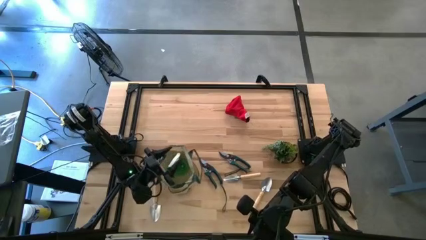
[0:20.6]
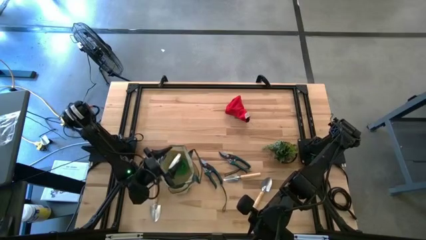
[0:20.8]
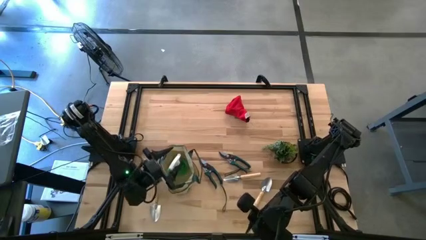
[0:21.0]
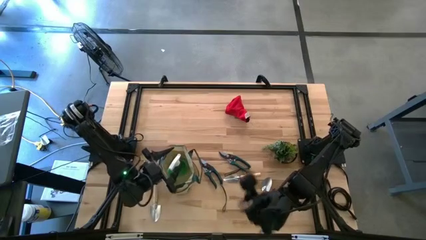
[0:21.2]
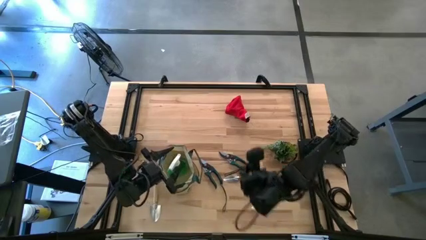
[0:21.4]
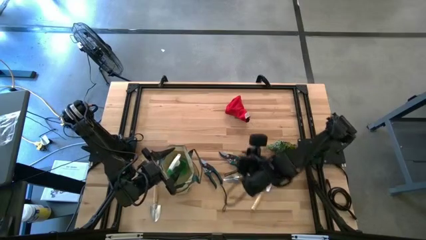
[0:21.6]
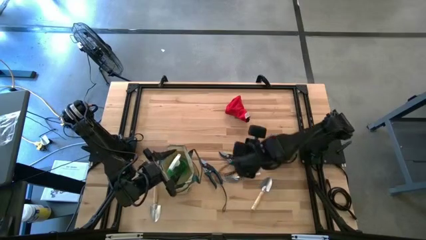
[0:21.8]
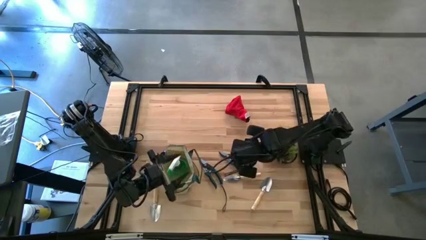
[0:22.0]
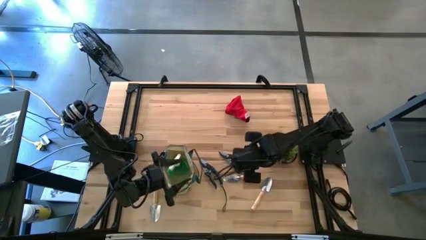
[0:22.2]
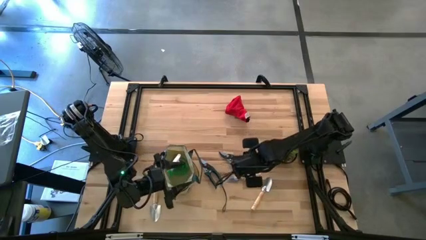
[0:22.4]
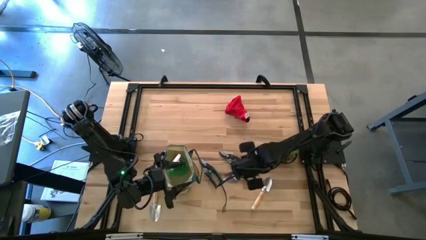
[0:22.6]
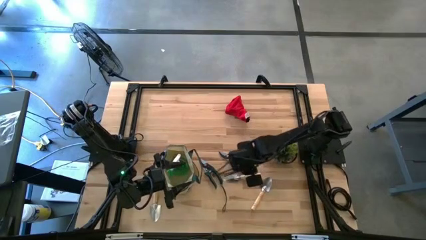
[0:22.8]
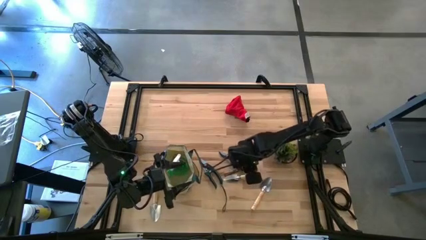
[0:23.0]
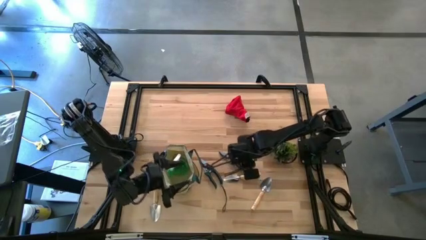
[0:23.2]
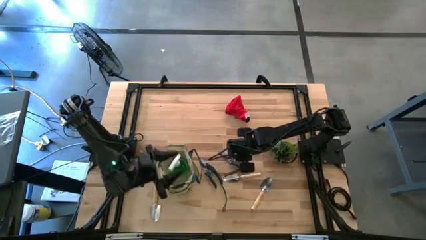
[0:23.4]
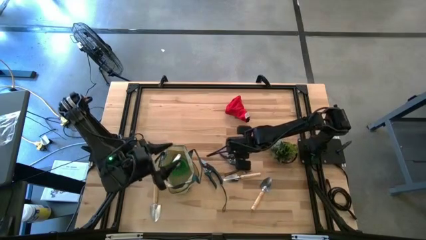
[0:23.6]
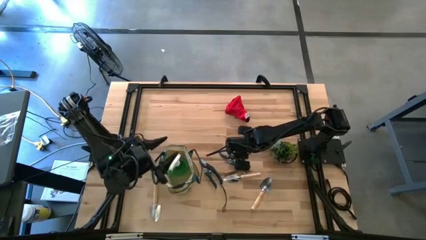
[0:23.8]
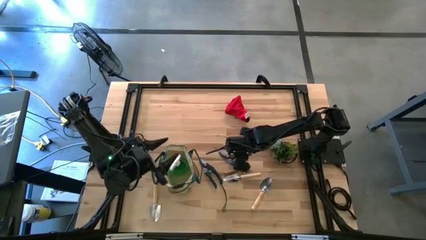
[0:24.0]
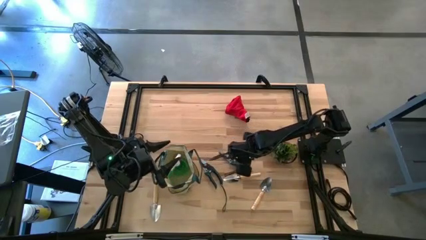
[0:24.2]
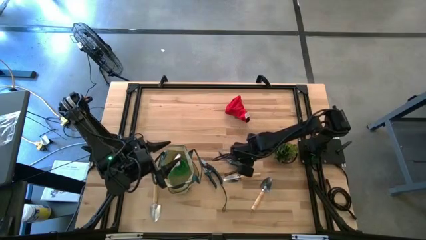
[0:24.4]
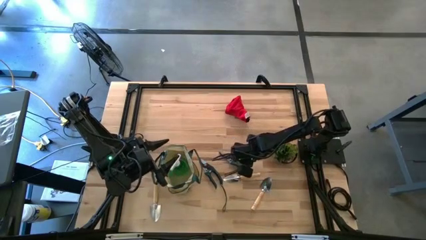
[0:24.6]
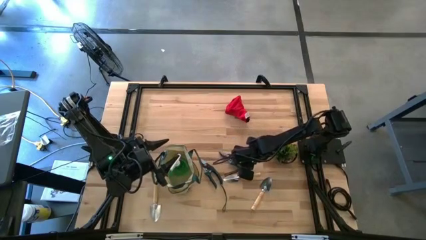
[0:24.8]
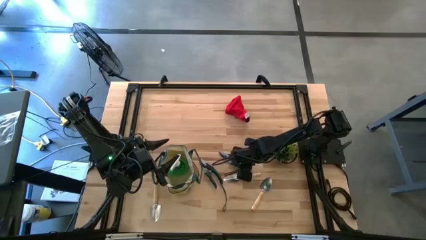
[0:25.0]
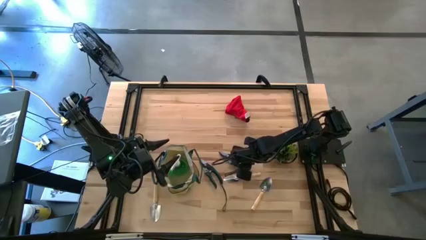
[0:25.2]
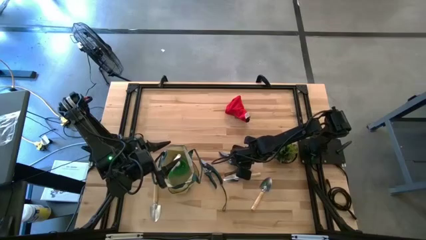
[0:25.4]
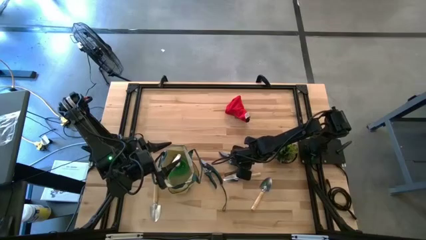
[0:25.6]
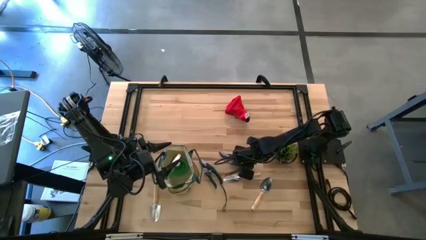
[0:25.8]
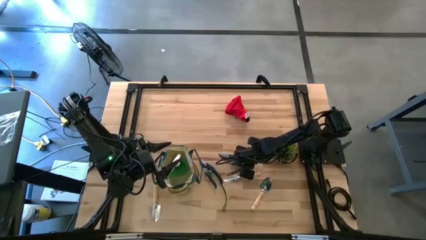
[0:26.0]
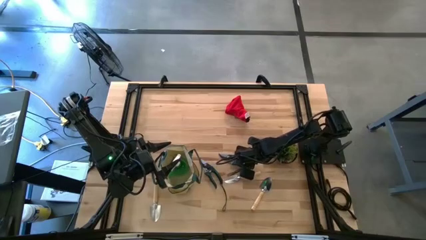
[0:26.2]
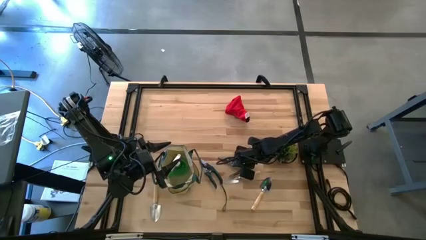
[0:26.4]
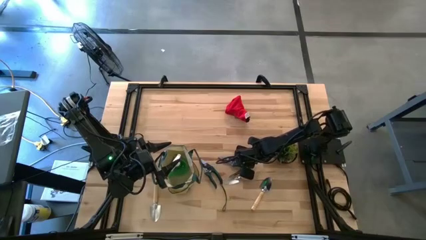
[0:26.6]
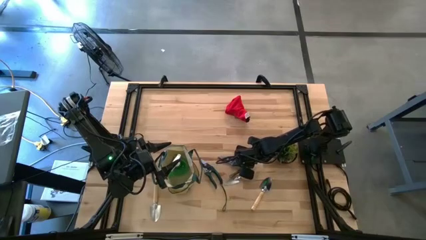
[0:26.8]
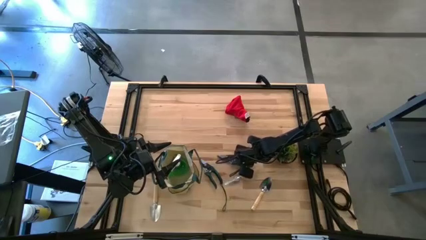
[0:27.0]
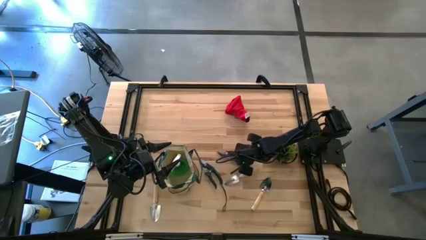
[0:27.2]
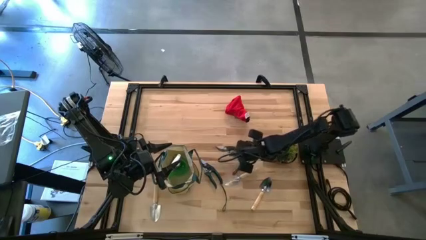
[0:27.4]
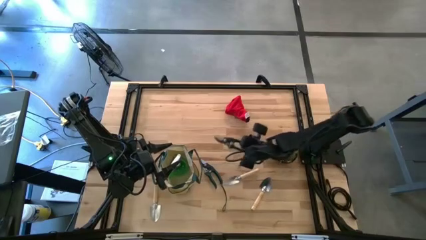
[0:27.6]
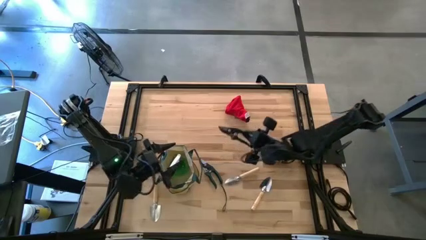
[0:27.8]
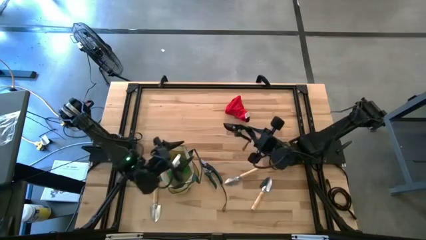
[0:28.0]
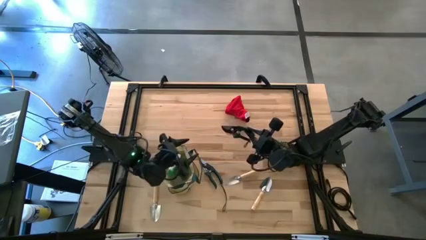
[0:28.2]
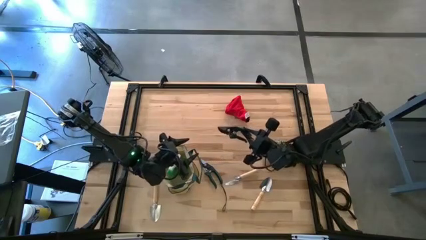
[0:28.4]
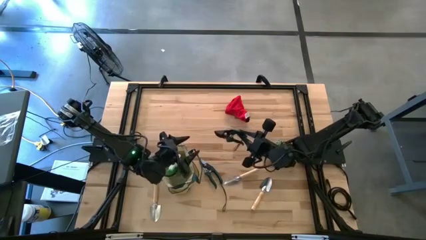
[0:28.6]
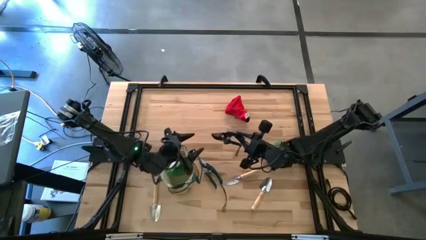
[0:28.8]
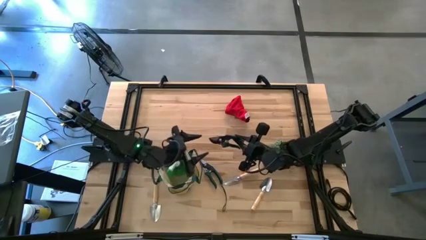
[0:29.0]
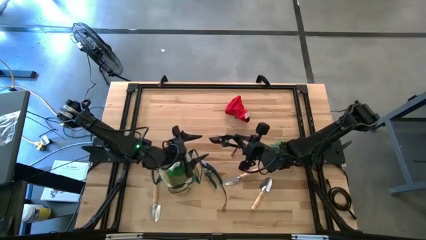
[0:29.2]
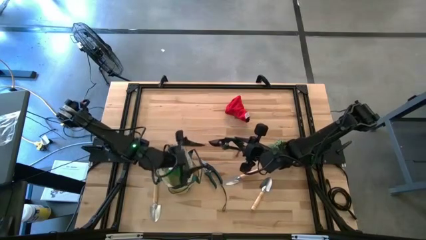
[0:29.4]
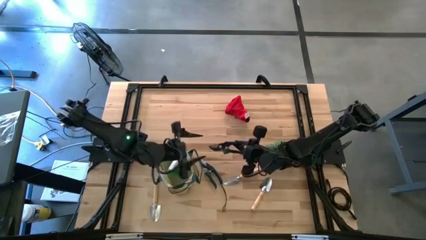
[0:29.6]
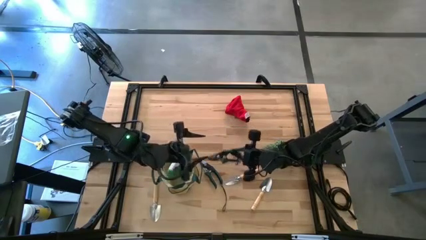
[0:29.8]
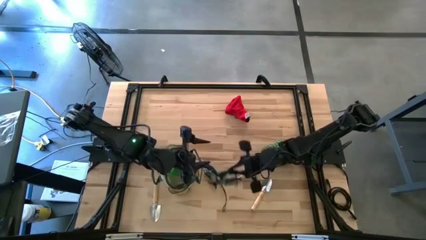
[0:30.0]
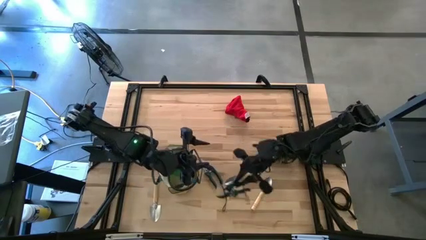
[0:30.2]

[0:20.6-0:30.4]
Task: Pick & Place Garden tools in Gardening bag
Put the right green shears into the brown gardening bag

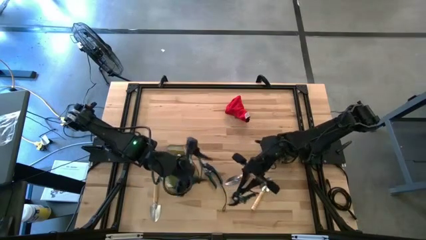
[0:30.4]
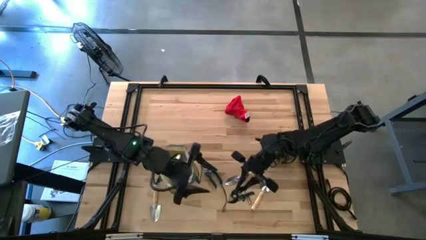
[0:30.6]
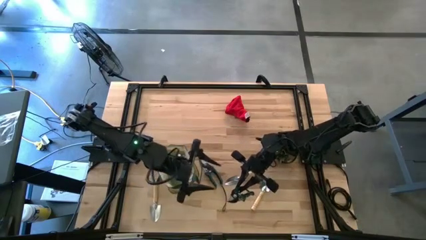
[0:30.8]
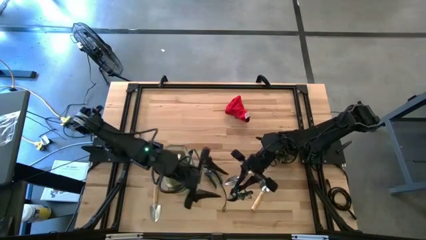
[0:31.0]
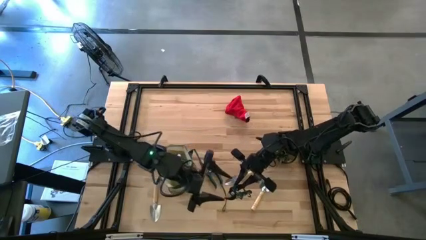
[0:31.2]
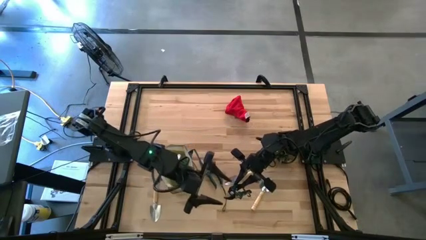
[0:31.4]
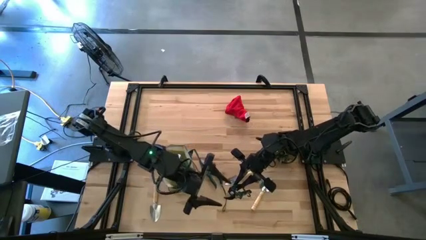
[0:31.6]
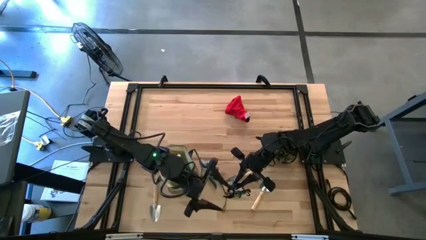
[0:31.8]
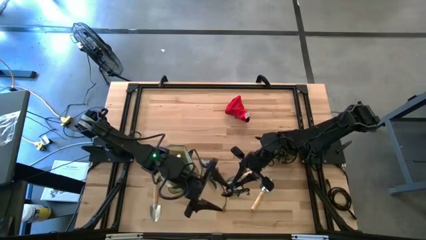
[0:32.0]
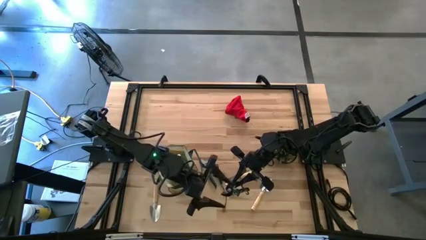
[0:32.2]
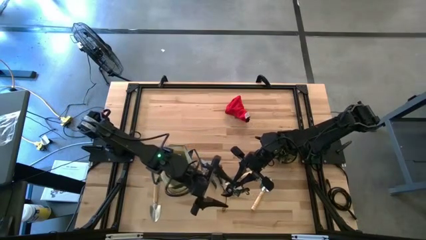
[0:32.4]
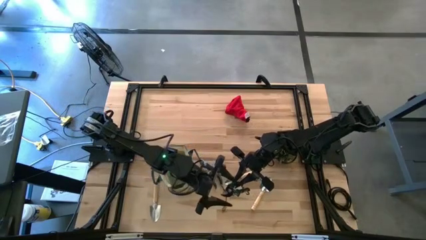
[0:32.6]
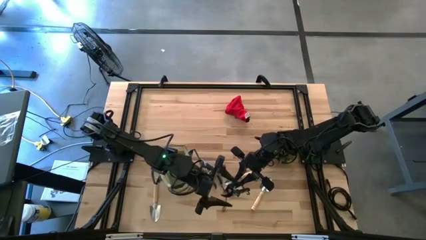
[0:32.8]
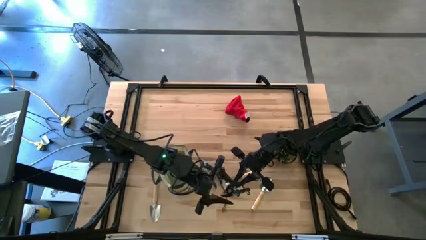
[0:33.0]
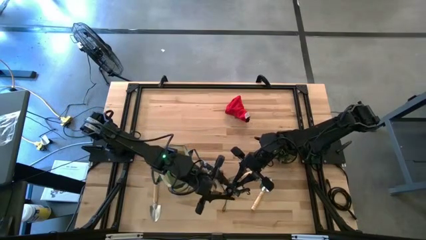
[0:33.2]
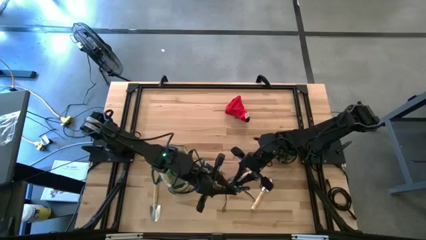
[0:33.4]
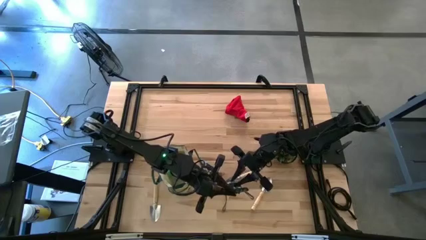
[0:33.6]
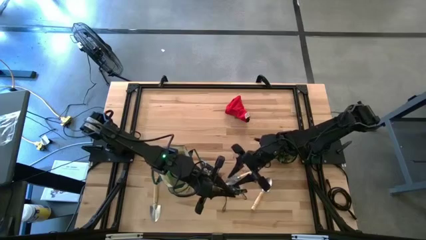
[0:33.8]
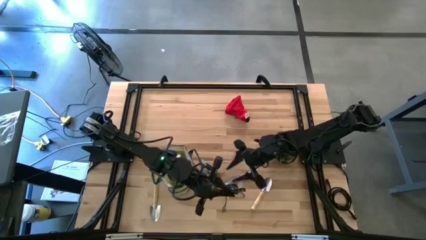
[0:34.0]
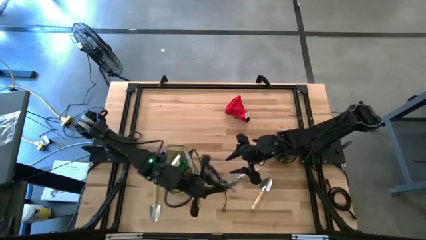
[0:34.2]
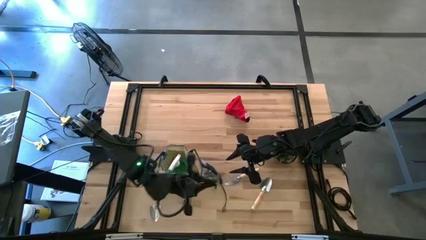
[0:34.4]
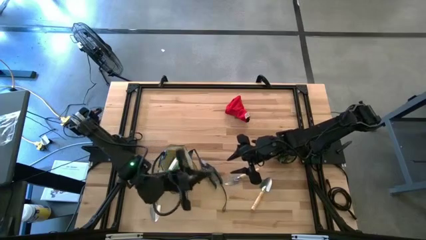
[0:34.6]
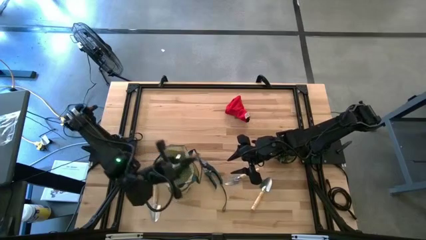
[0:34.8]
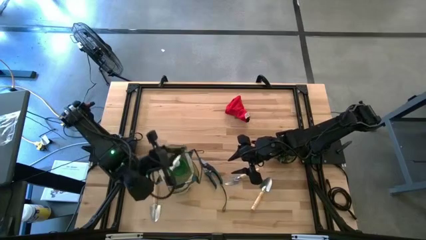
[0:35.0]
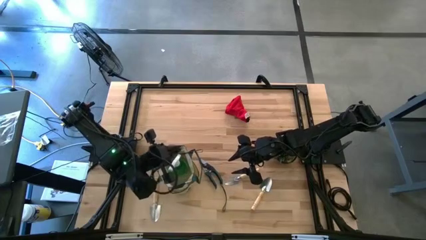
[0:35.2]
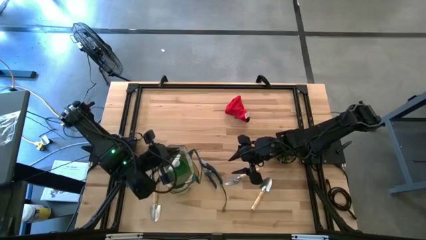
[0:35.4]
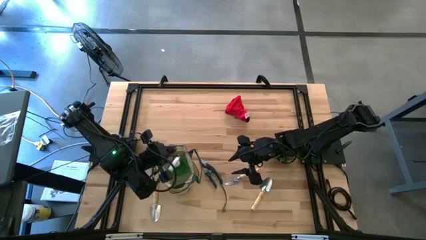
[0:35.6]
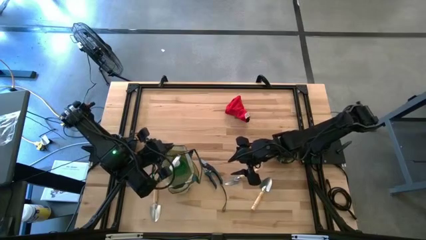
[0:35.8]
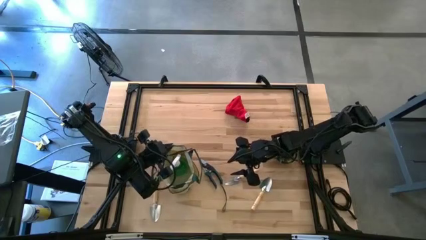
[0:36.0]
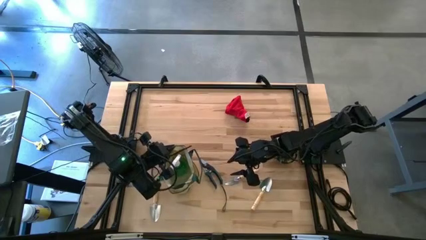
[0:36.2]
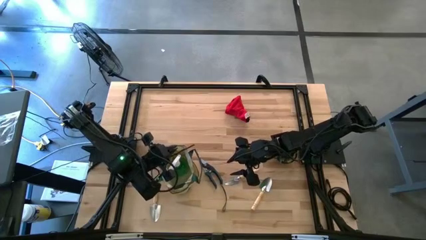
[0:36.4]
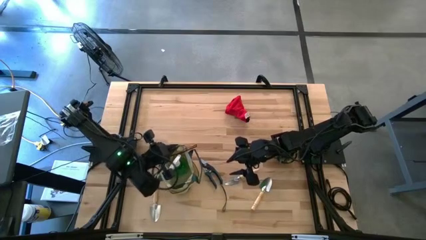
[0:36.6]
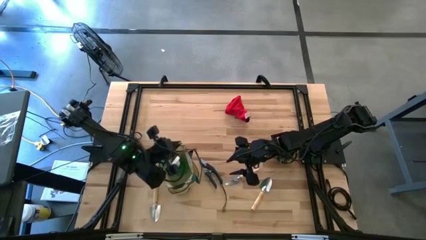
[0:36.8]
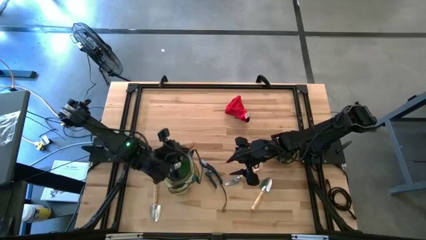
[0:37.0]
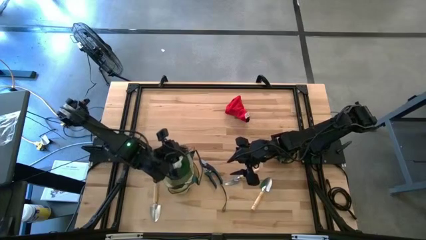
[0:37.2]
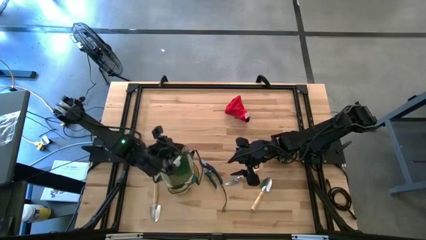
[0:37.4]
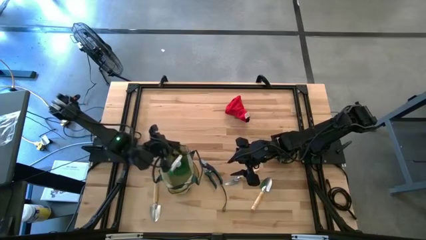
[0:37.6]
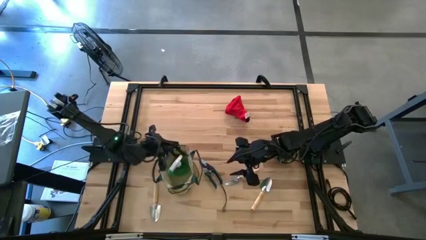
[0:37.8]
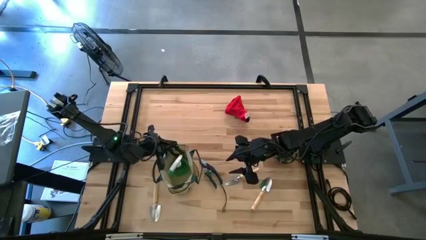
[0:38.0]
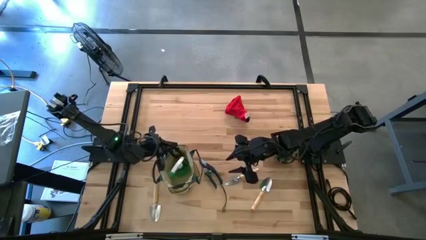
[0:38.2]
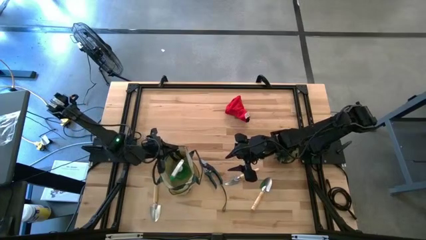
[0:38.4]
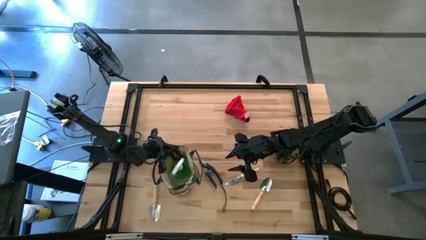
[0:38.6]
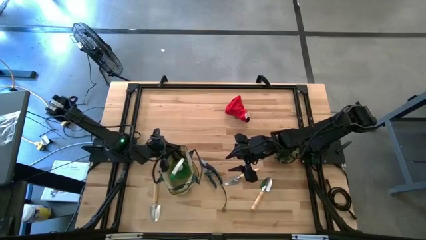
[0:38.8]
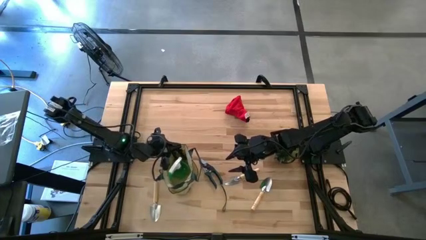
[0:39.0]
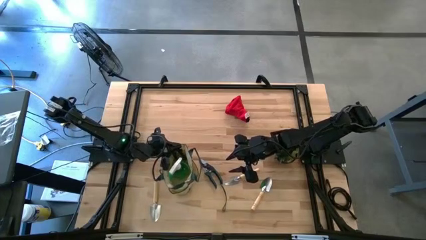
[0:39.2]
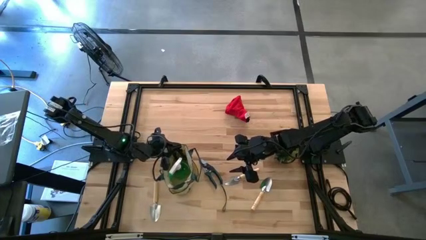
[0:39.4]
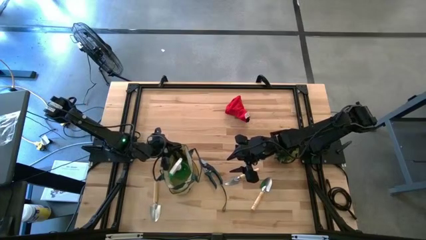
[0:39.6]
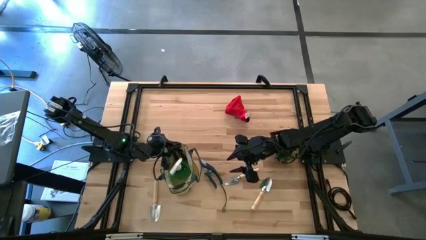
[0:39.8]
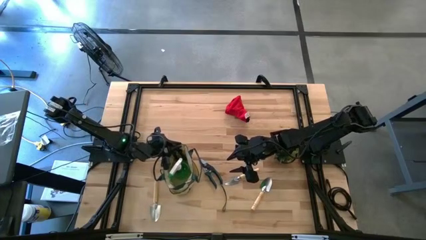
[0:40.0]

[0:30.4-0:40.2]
Put the right green shears into the brown gardening bag
